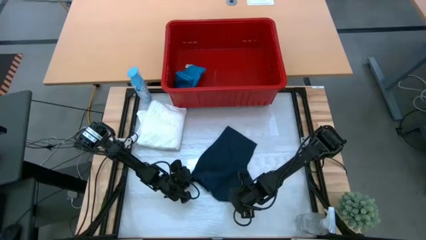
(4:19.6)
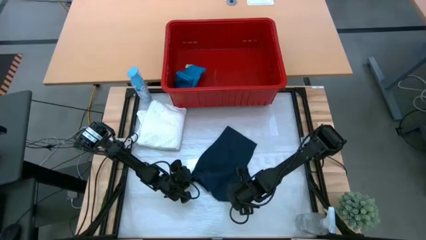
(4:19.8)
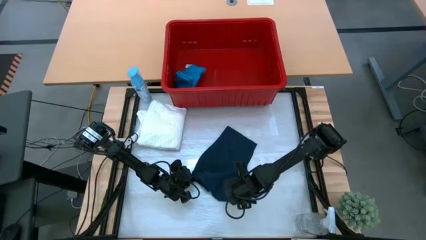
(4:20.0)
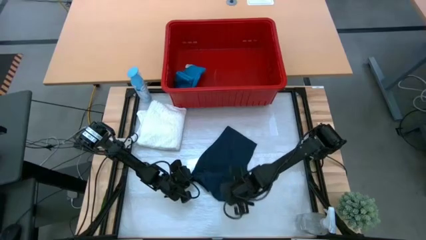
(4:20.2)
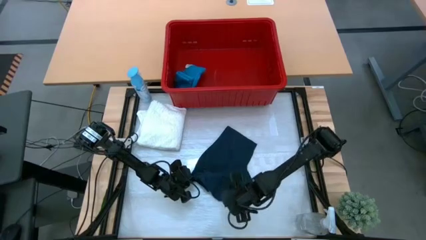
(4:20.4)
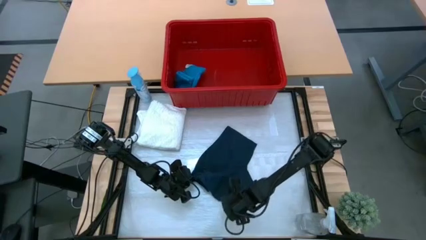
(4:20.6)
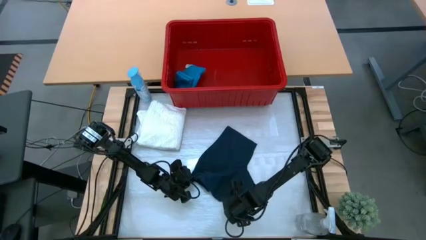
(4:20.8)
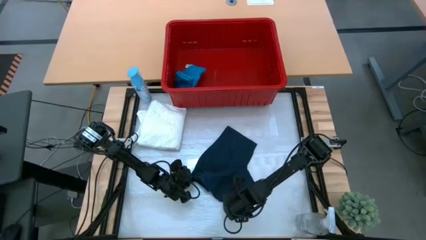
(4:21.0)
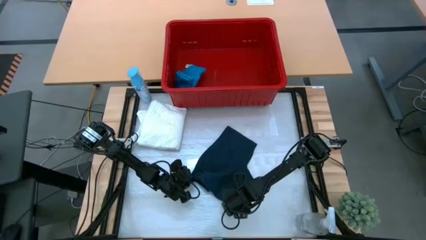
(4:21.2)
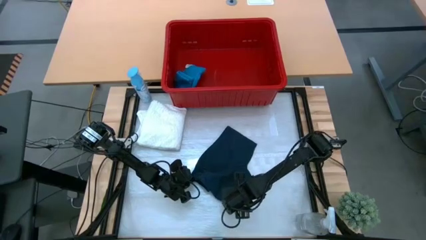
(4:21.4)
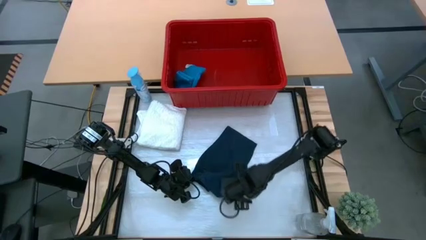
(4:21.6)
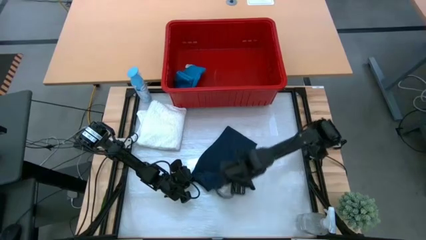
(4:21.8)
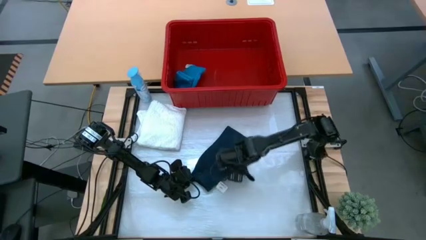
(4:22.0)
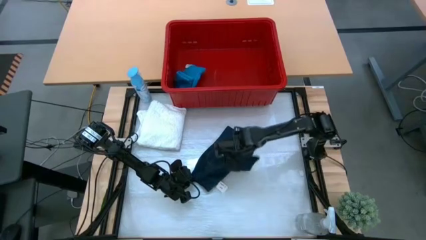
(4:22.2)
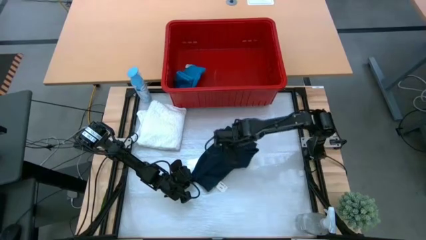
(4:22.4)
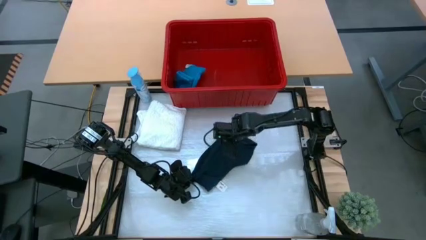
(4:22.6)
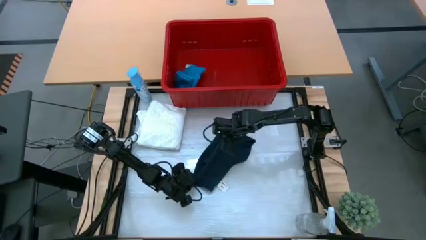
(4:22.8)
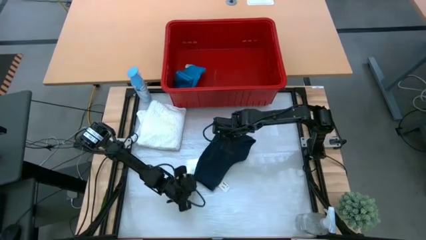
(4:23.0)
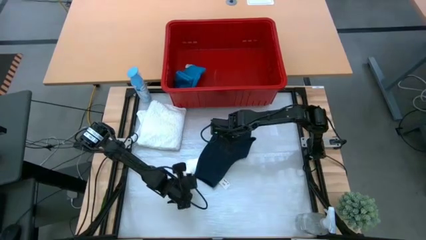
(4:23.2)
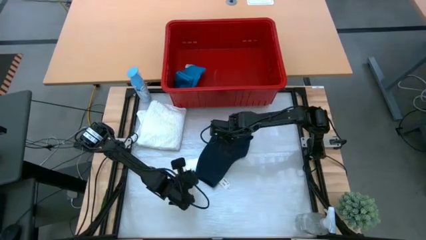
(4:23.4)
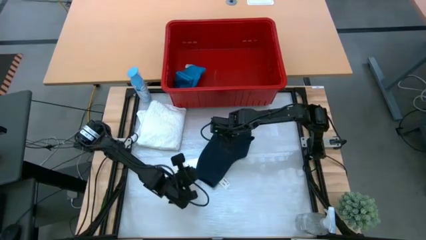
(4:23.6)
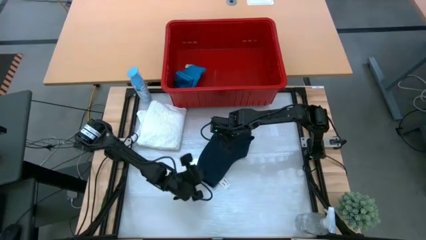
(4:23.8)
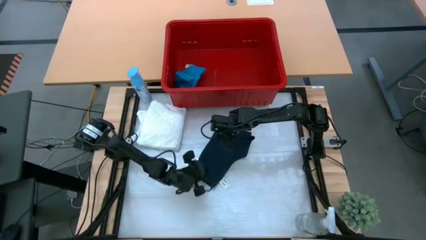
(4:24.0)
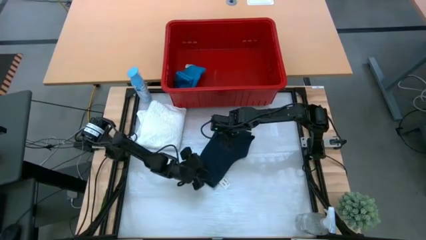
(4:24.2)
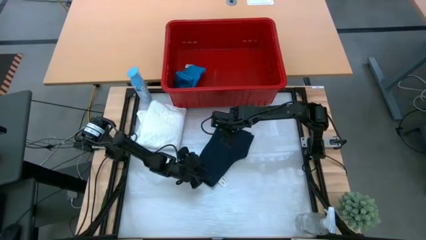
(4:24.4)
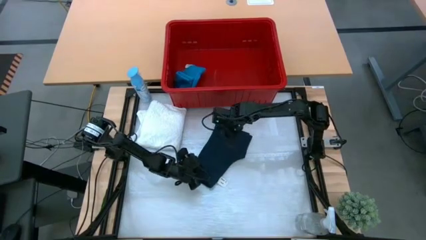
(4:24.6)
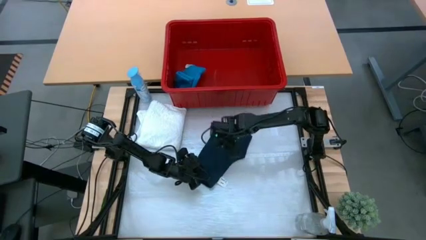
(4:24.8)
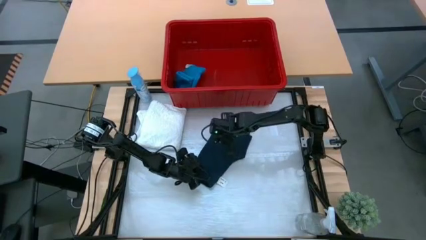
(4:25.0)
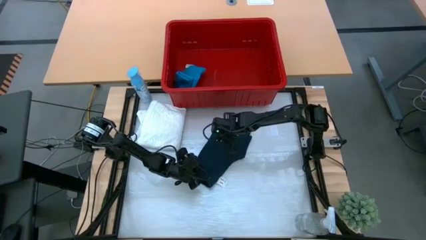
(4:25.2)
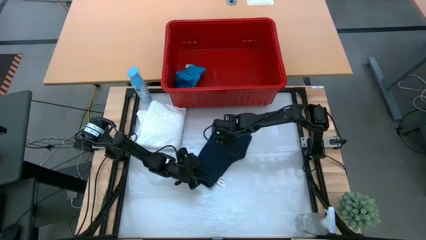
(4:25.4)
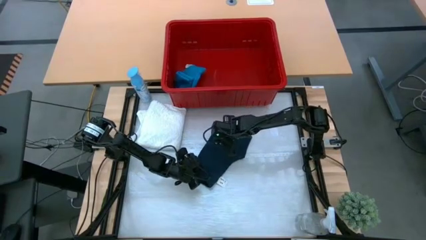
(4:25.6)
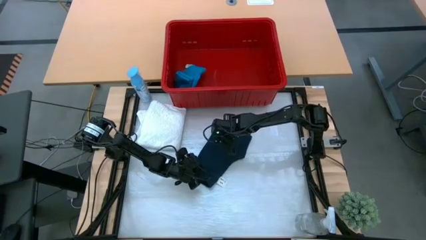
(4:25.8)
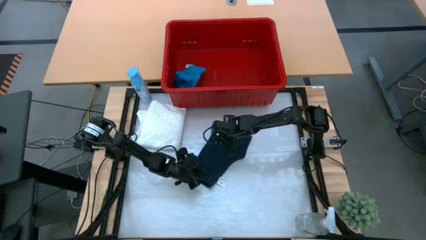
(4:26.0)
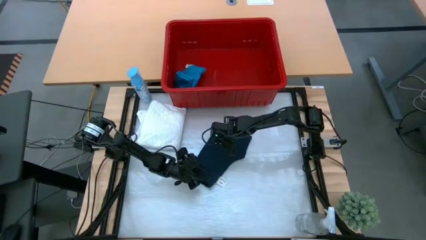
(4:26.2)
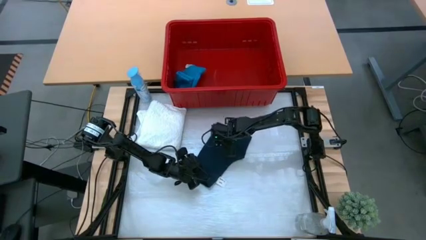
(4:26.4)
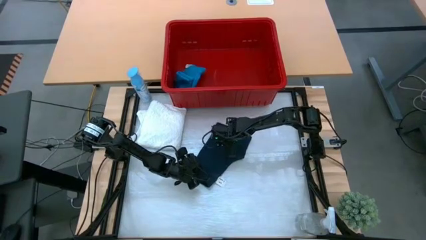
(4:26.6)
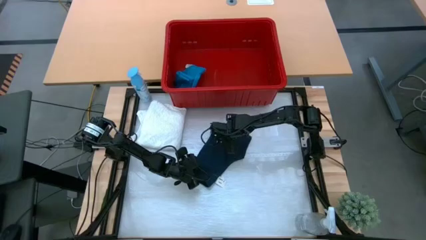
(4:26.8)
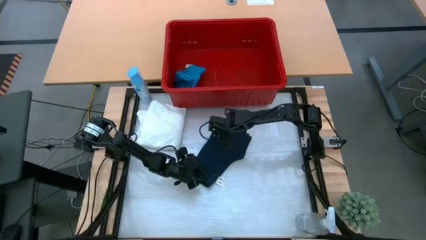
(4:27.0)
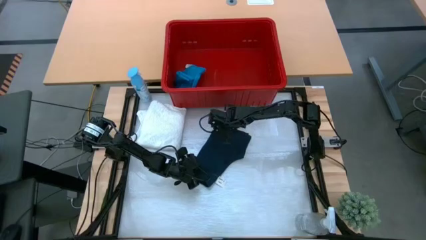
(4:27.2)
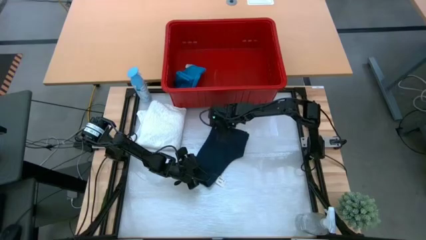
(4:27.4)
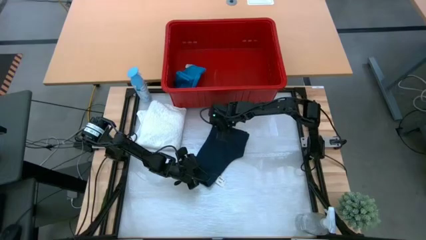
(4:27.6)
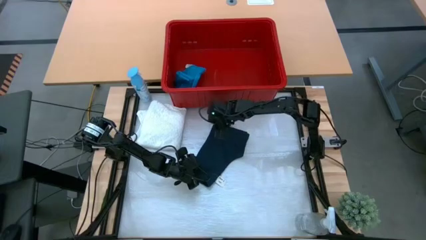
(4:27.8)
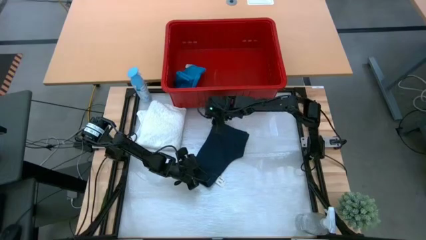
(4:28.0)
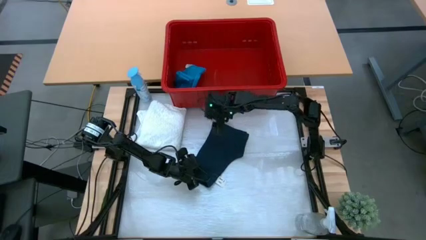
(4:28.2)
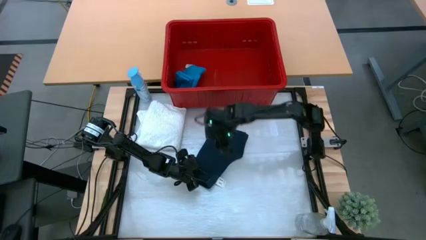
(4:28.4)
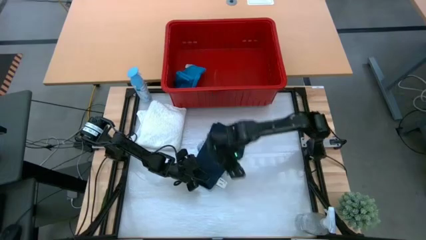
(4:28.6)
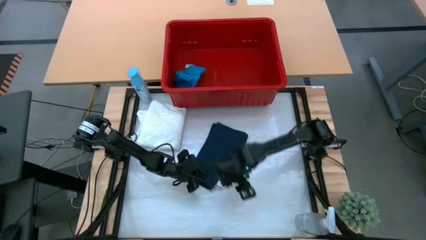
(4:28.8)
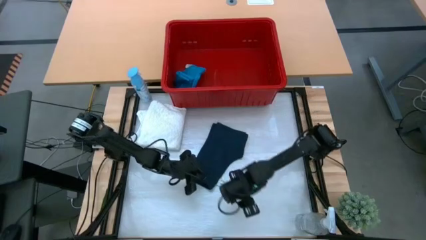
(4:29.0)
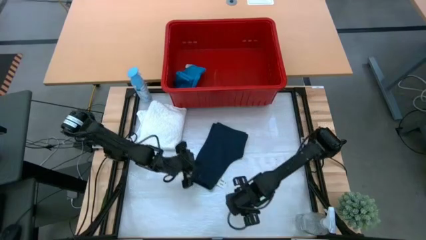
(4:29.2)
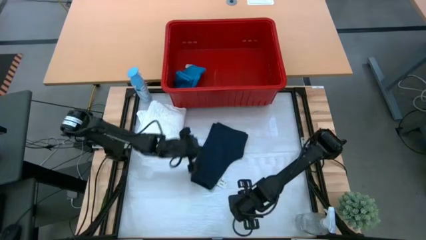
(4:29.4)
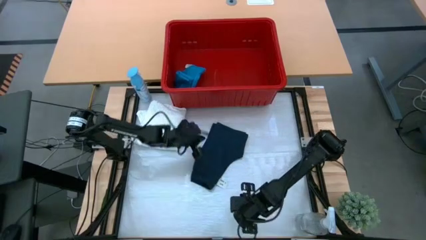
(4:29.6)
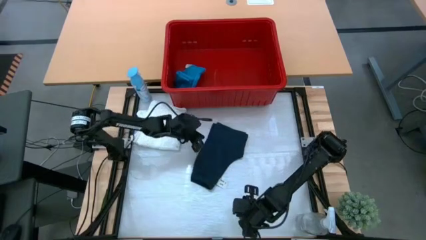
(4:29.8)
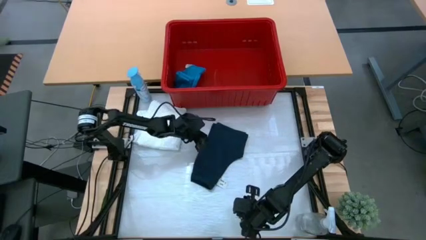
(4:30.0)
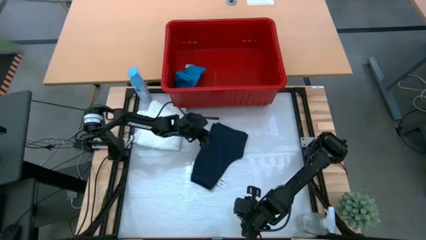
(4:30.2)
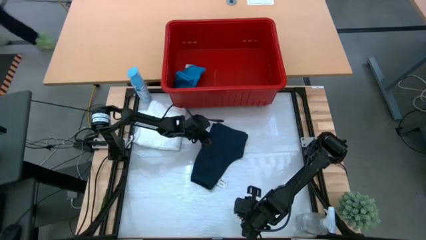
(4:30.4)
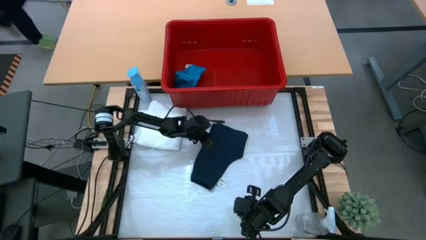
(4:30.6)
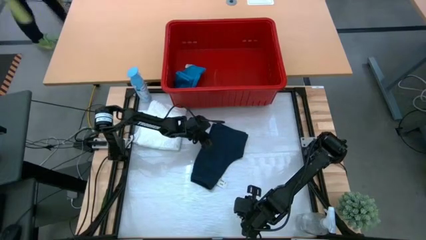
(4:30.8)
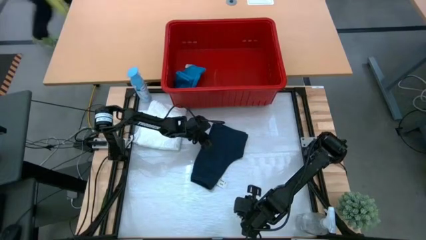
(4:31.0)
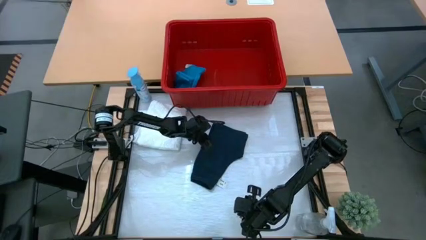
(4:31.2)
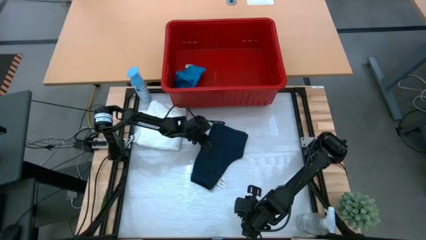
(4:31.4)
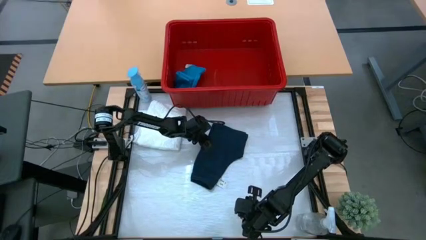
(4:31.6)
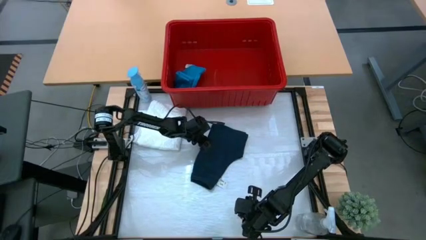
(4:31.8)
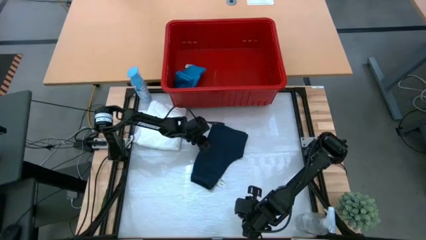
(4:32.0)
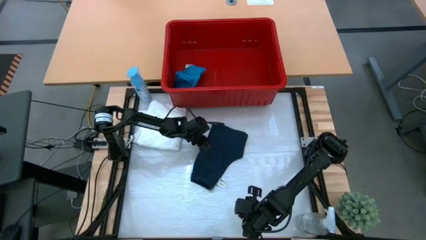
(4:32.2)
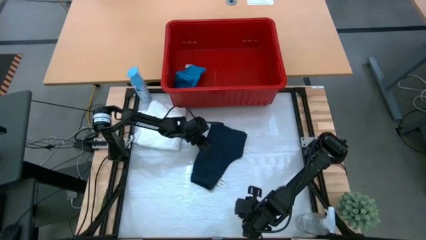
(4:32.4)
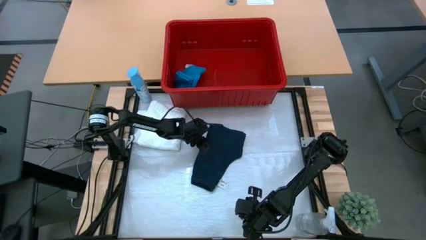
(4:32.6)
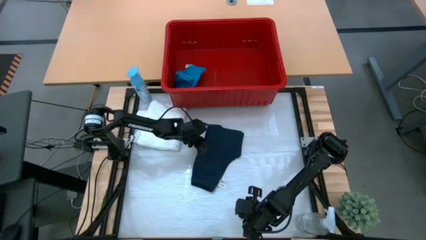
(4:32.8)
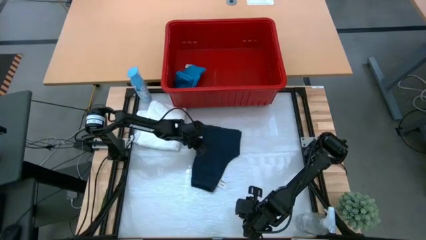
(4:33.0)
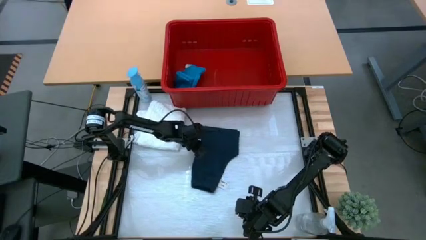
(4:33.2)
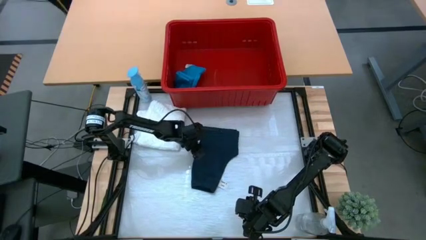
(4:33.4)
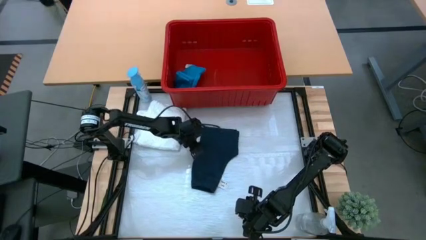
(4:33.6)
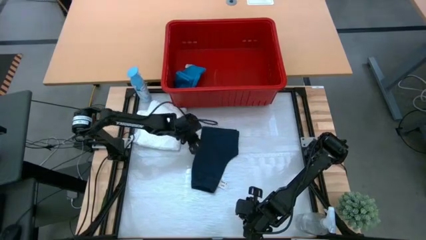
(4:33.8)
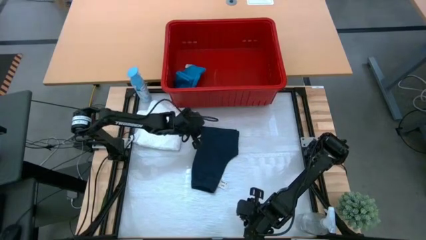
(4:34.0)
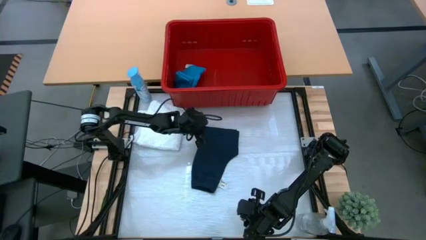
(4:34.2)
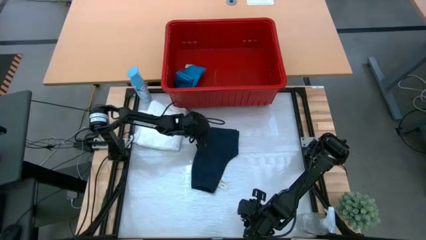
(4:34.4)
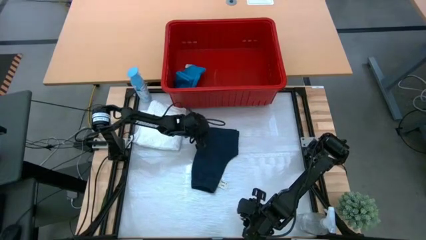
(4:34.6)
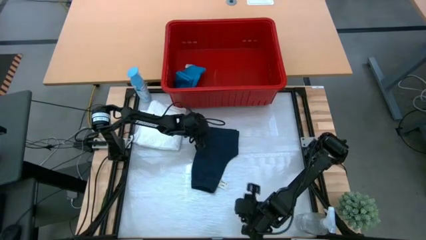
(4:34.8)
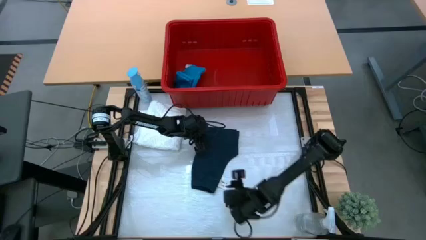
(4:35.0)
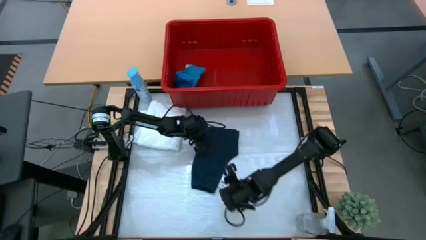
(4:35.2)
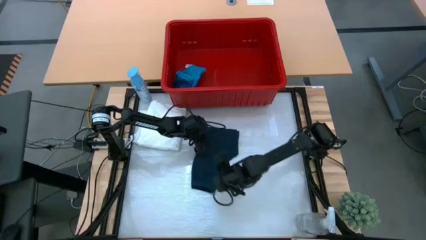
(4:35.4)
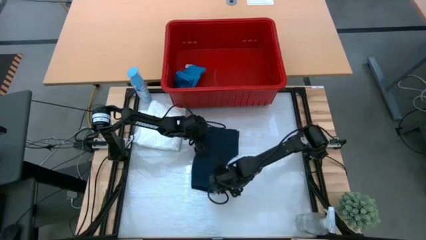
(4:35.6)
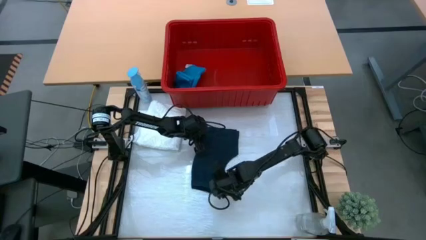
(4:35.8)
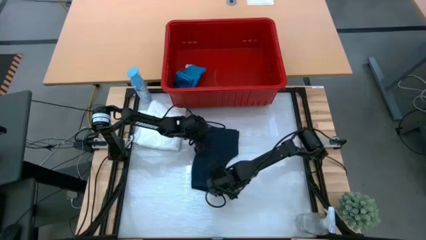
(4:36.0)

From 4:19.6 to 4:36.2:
Task: Fold Laundry from Bin
Fold the black shorts
